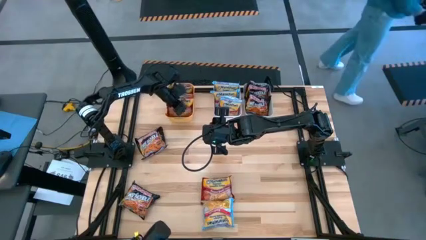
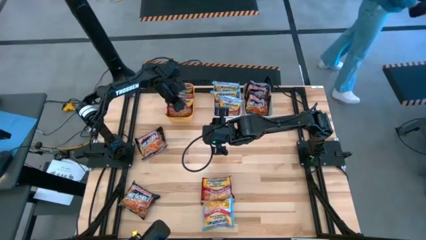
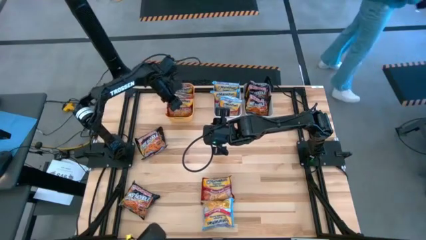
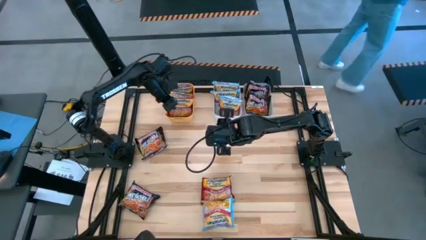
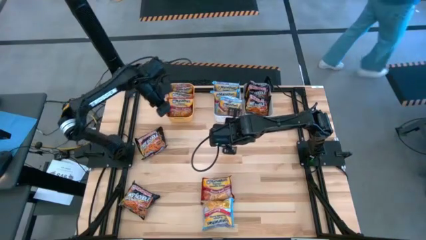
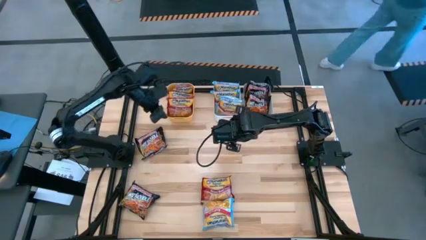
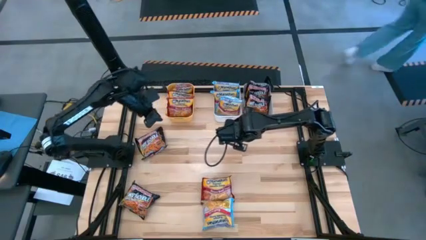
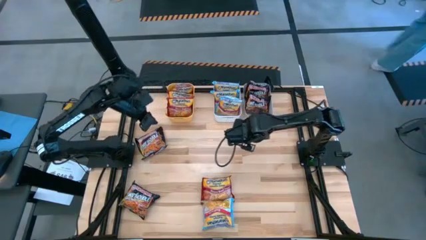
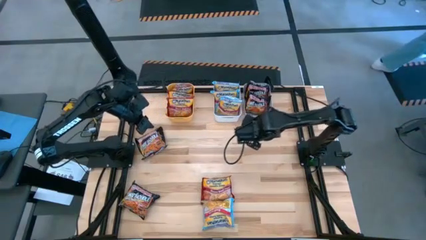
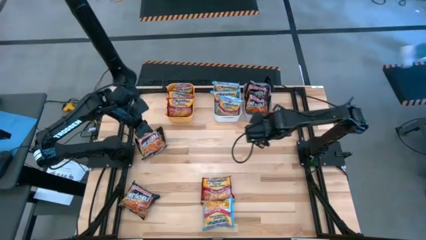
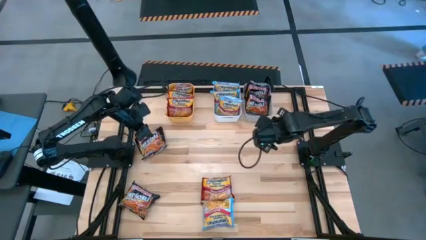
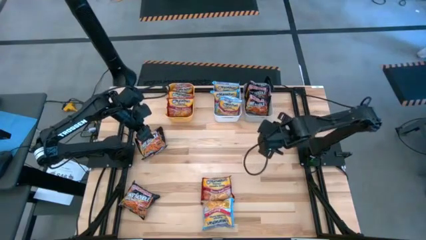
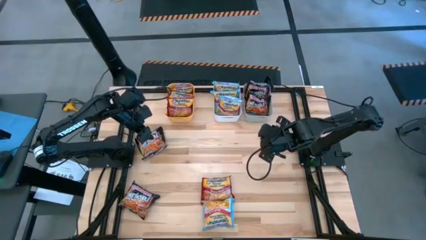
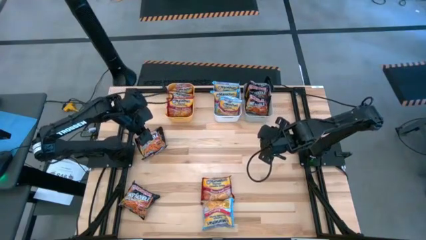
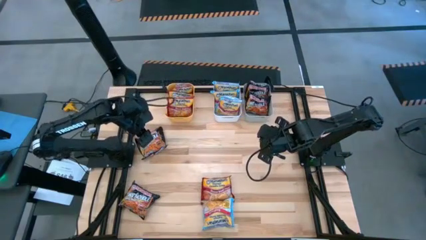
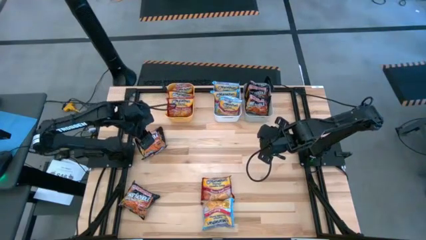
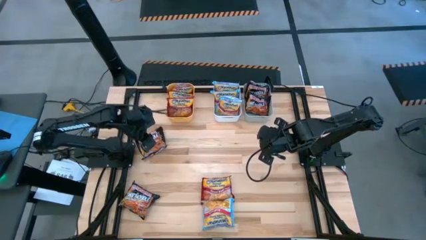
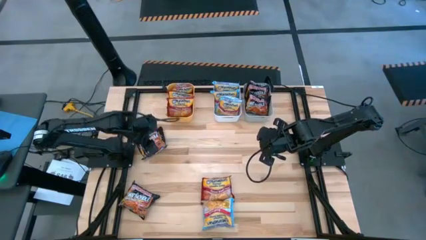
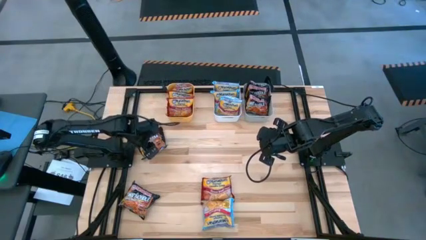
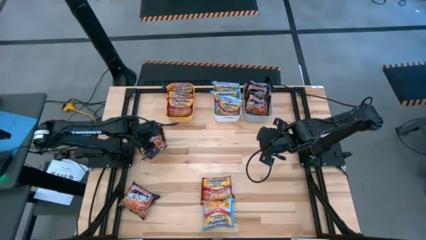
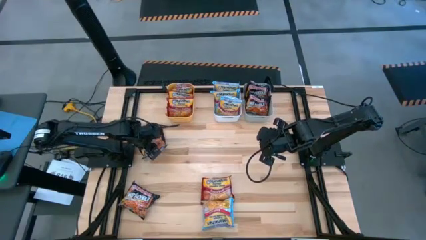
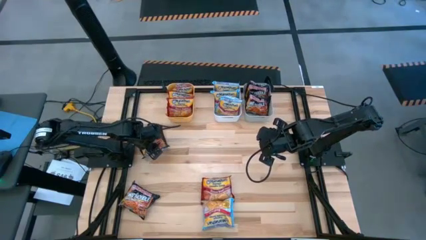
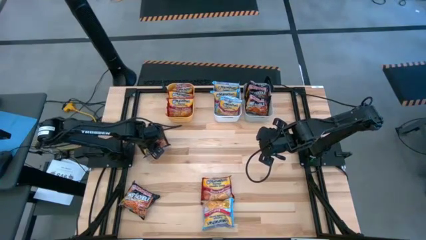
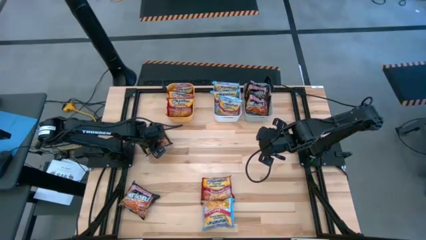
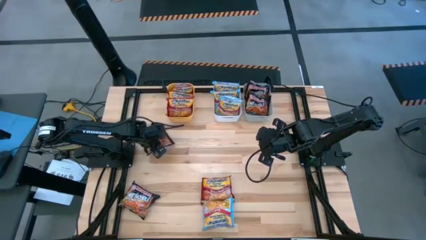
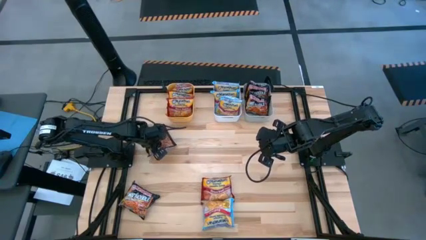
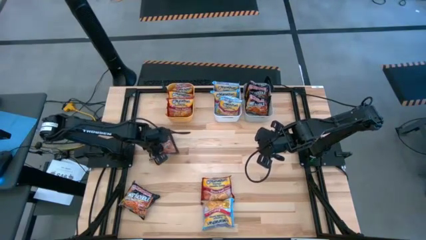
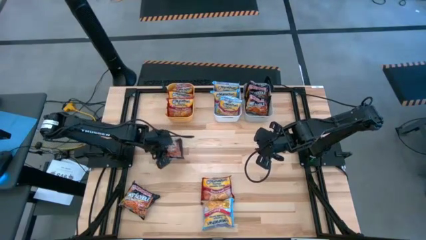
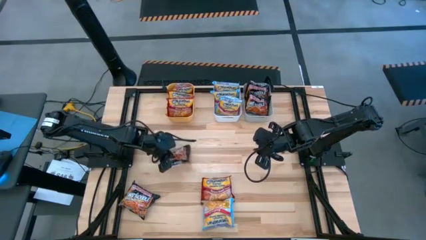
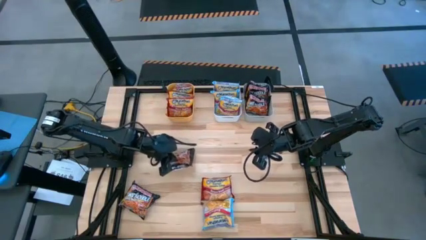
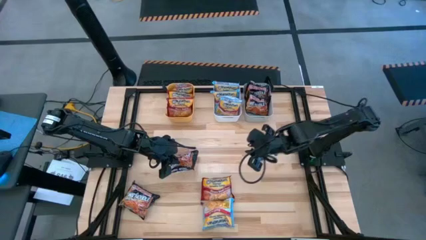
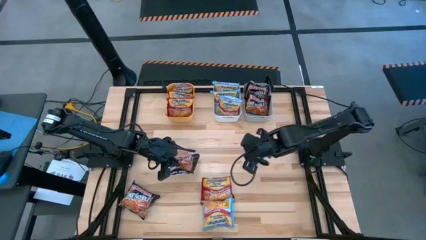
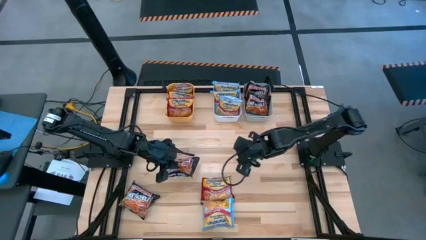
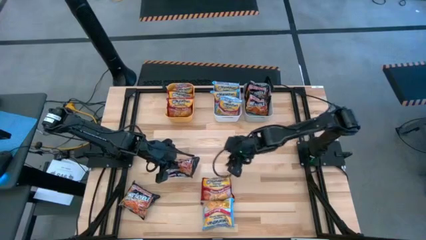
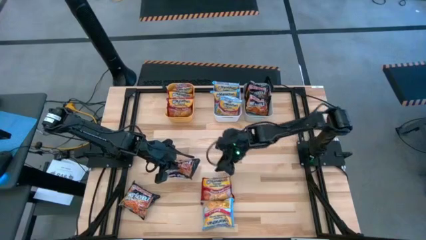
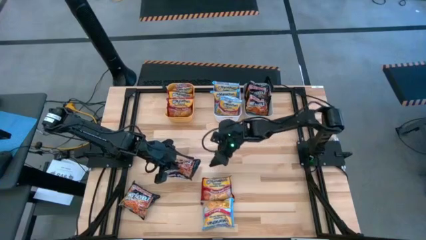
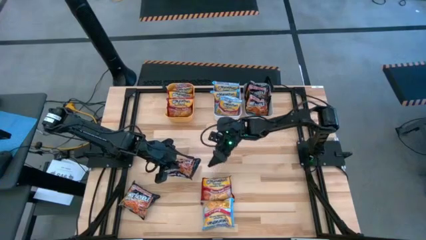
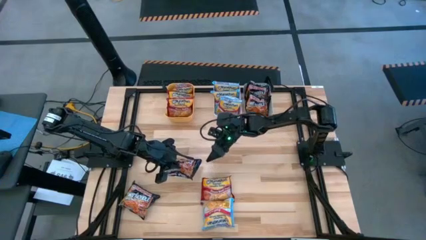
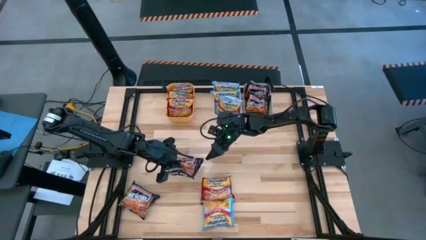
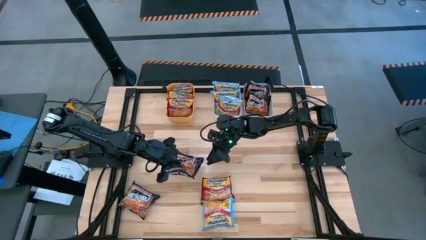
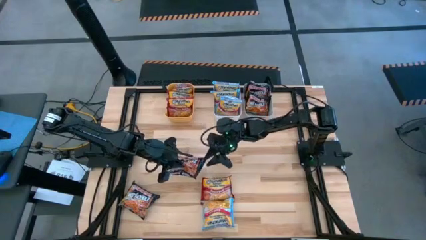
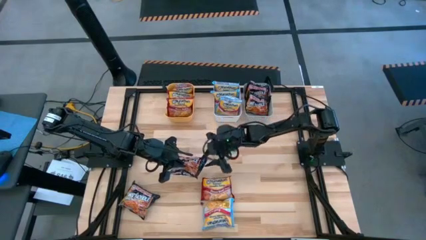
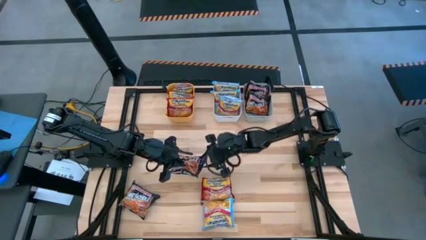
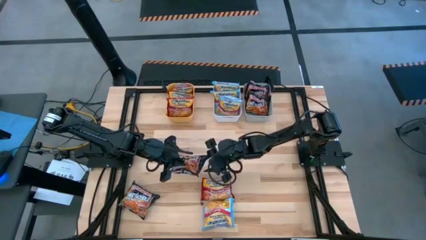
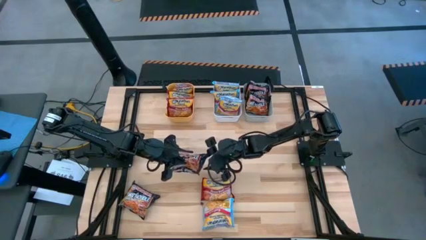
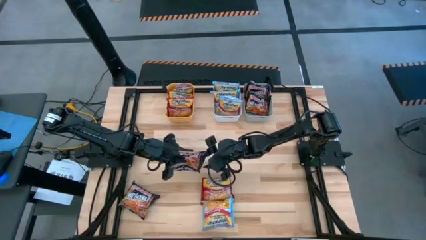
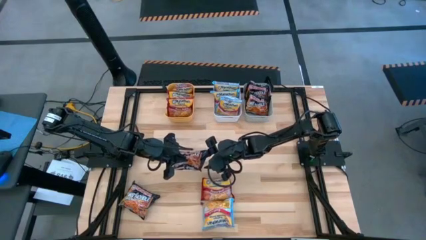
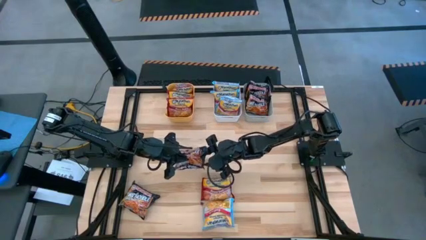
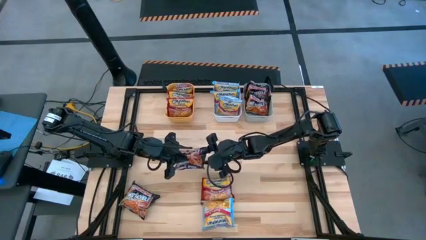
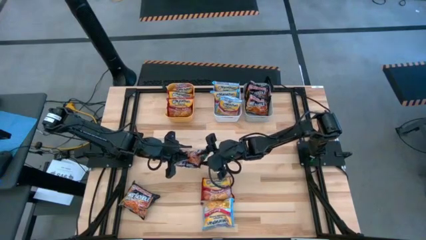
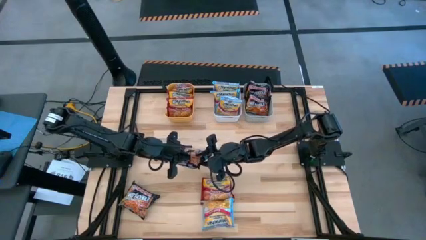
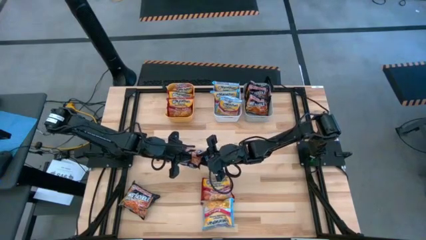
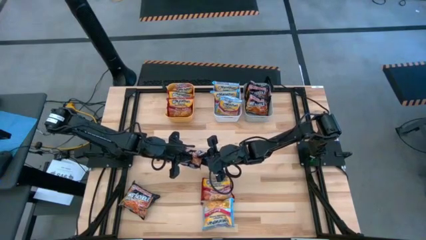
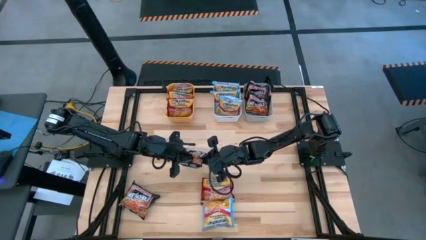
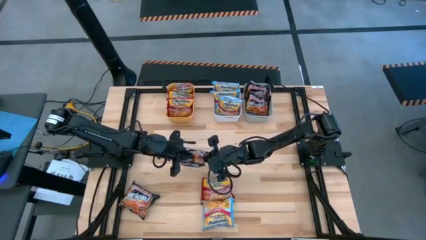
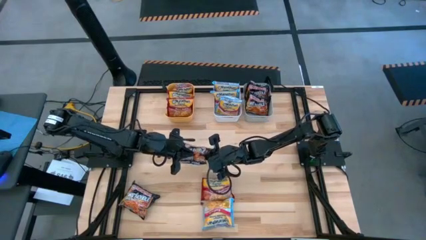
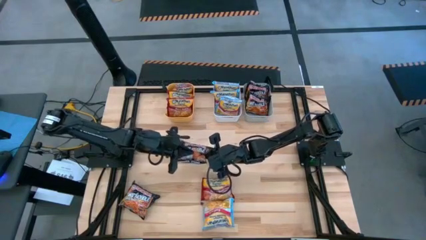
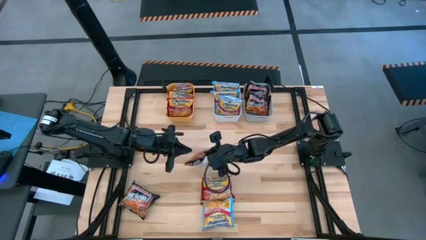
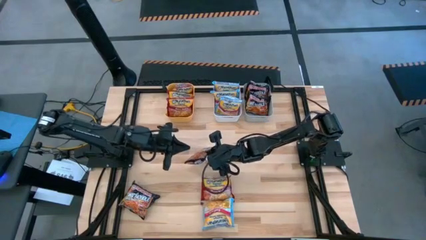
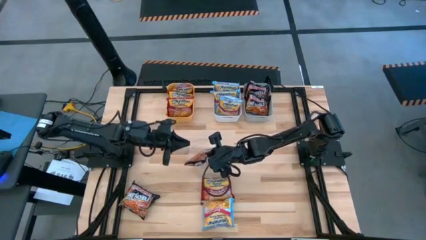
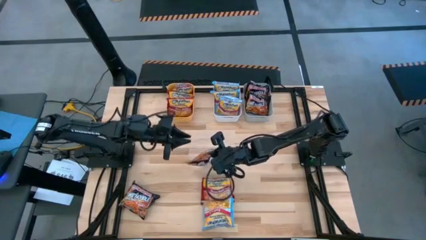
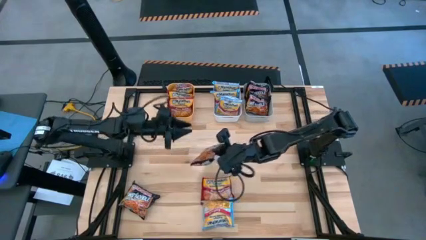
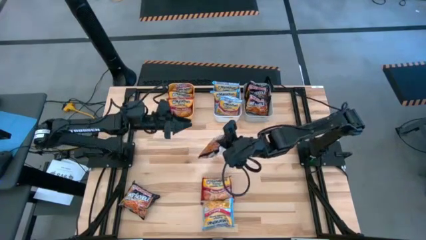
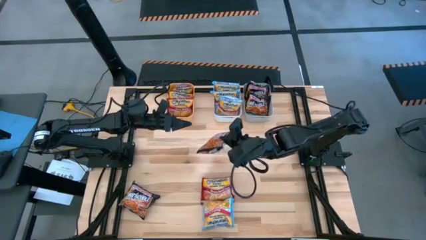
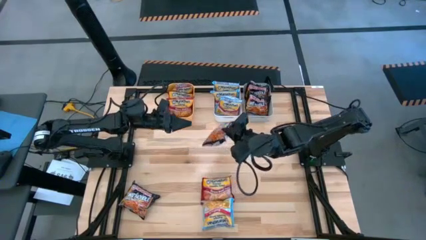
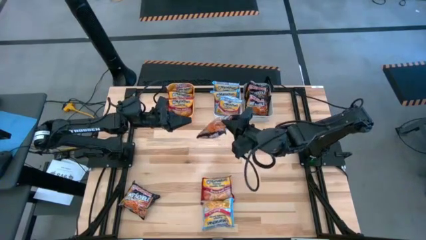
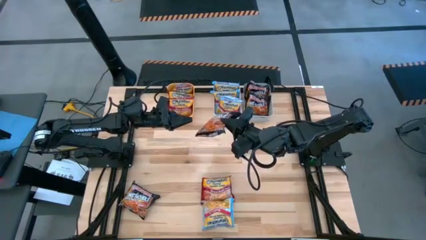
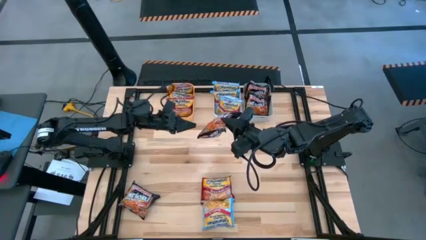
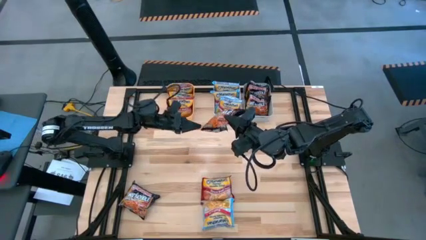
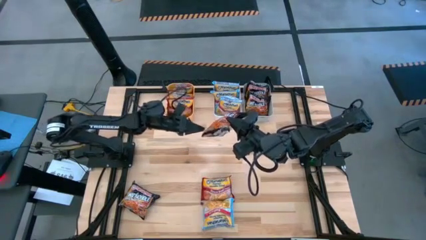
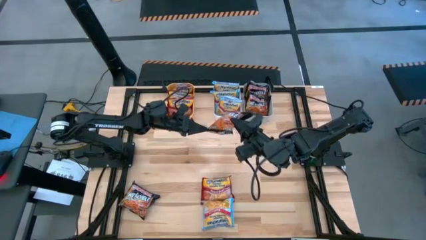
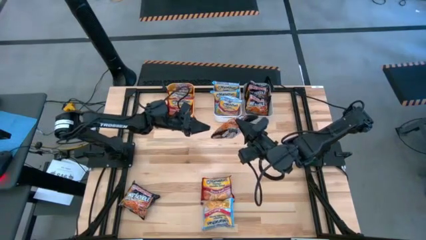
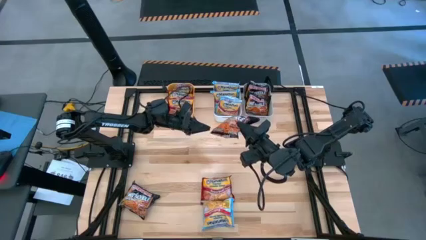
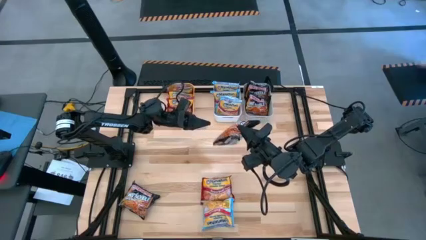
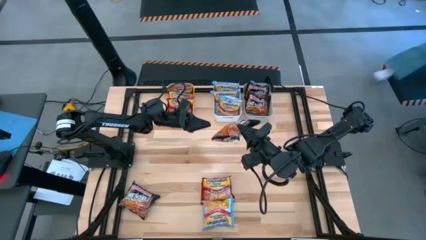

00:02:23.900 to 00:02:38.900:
Task: Sort Maruchan noodles
Put the black noodle pack into the gray bin

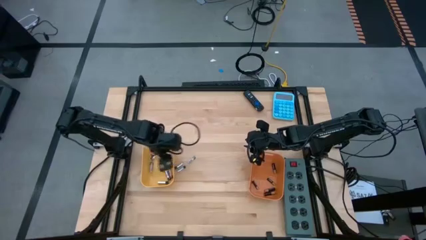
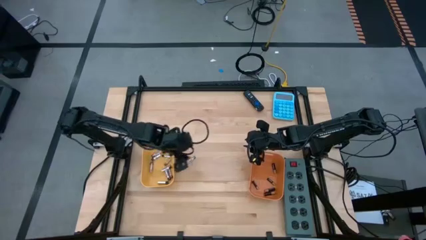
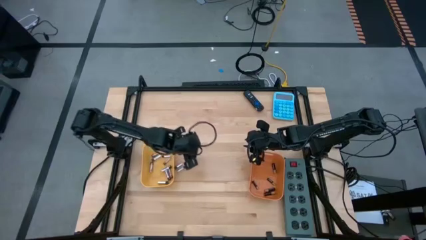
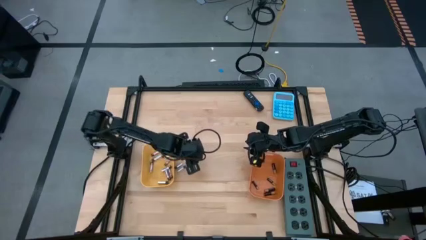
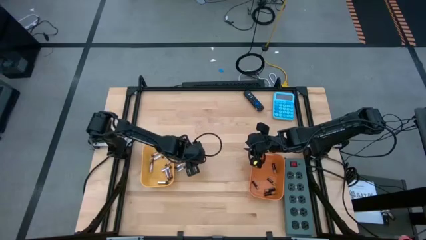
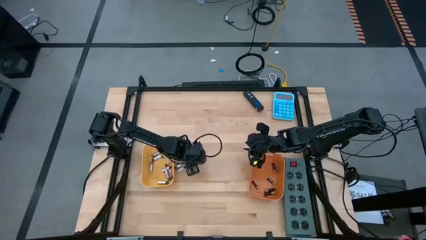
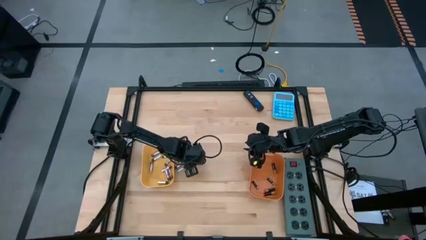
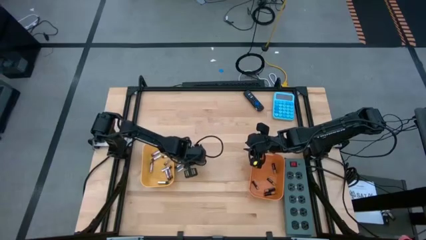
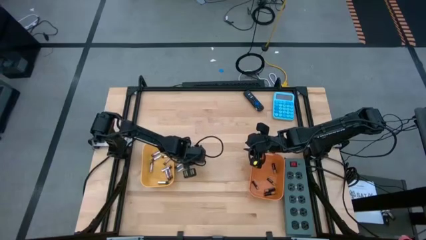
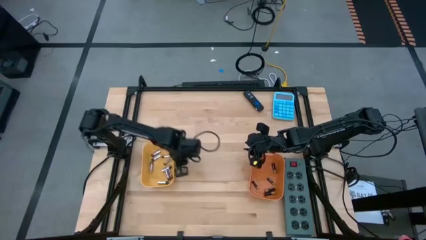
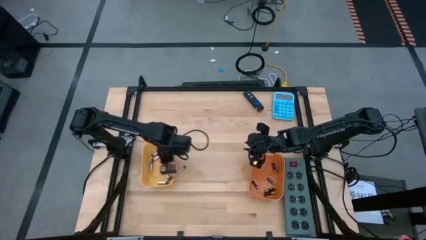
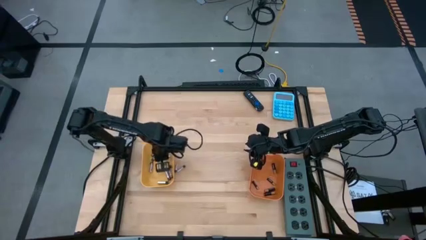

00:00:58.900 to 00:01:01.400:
Task: Sort batteries
Put the silver battery into the yellow bin
